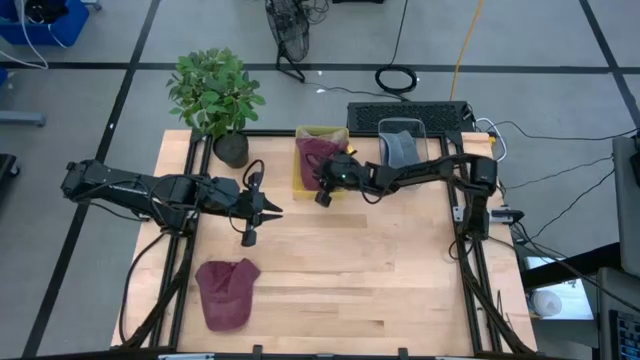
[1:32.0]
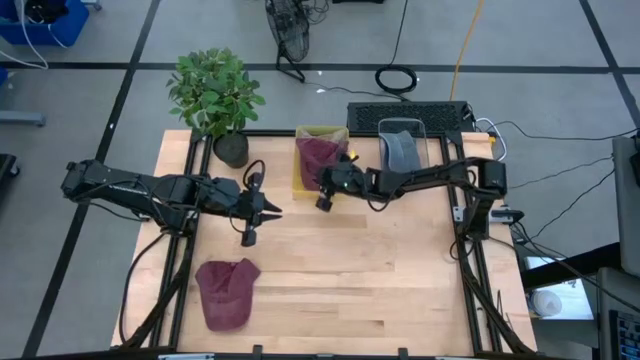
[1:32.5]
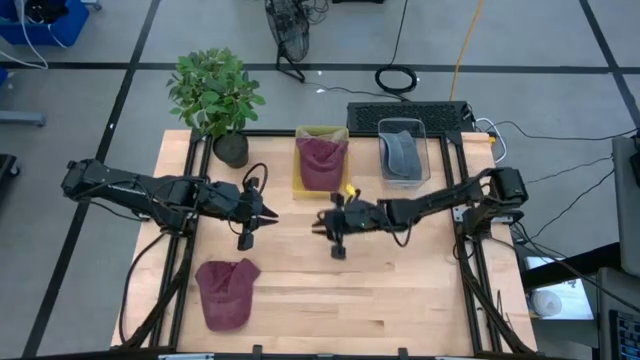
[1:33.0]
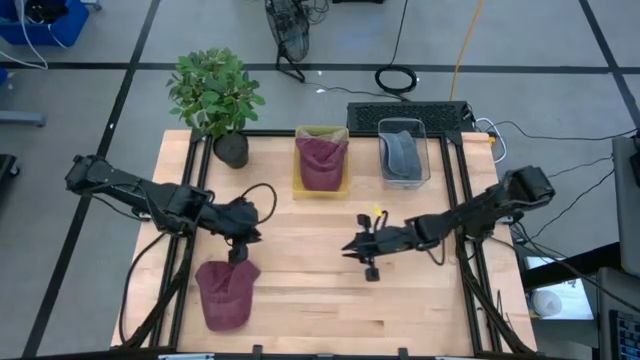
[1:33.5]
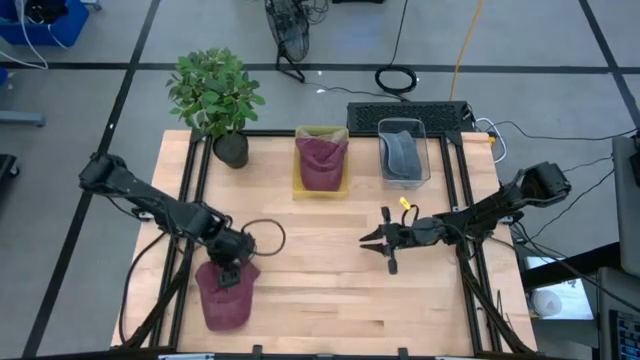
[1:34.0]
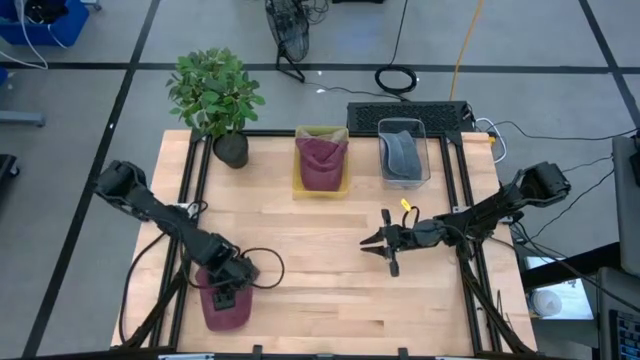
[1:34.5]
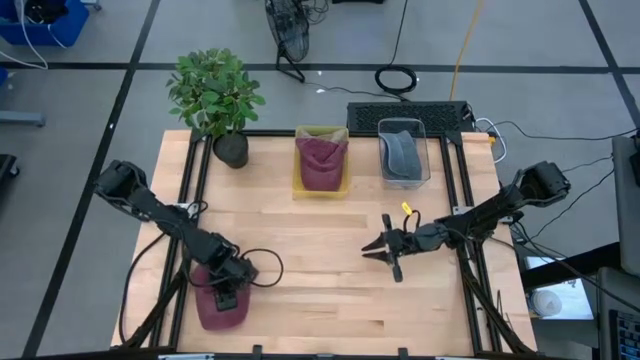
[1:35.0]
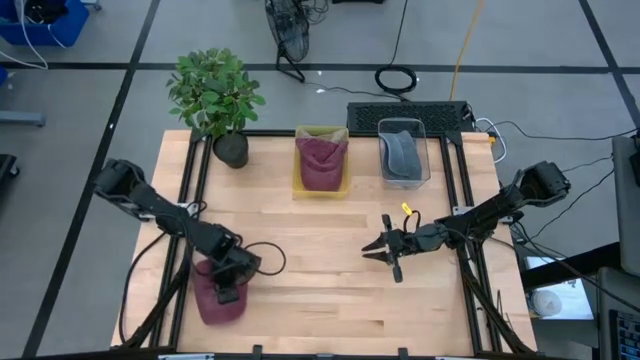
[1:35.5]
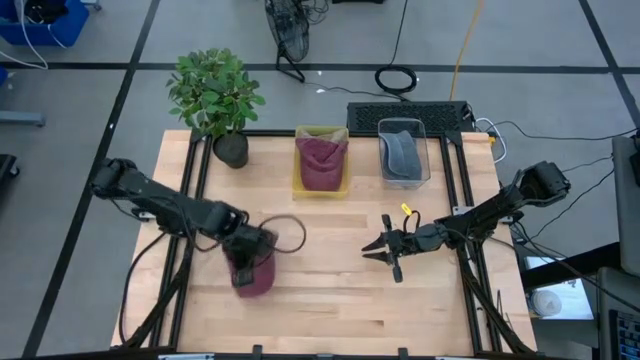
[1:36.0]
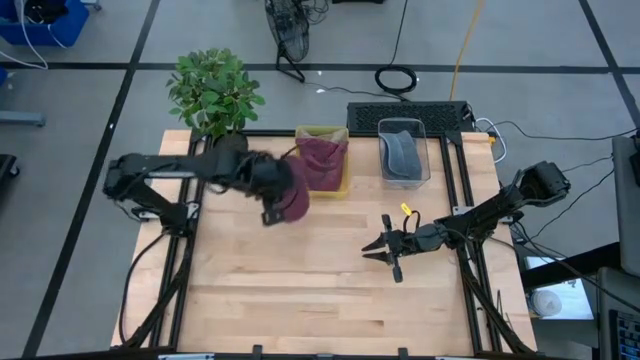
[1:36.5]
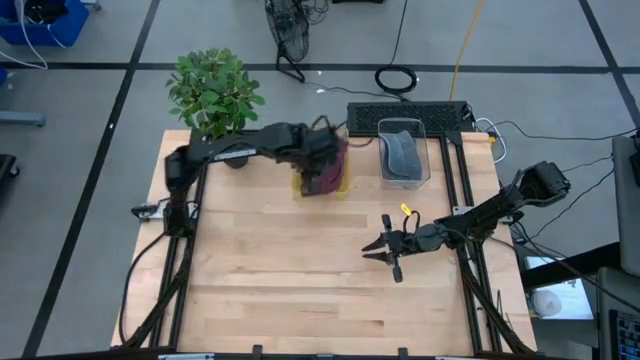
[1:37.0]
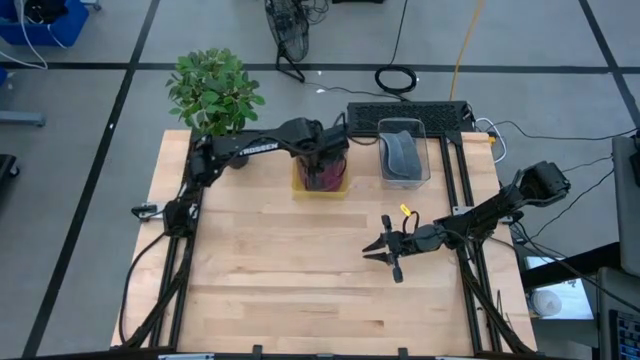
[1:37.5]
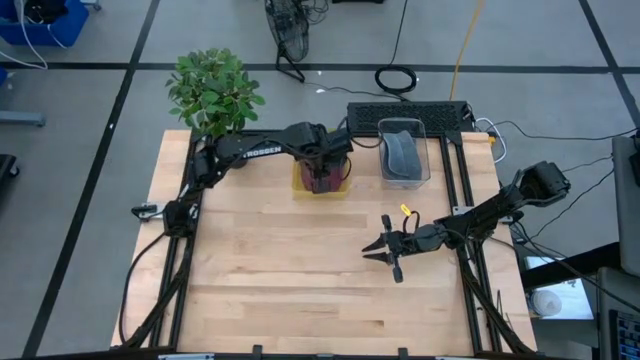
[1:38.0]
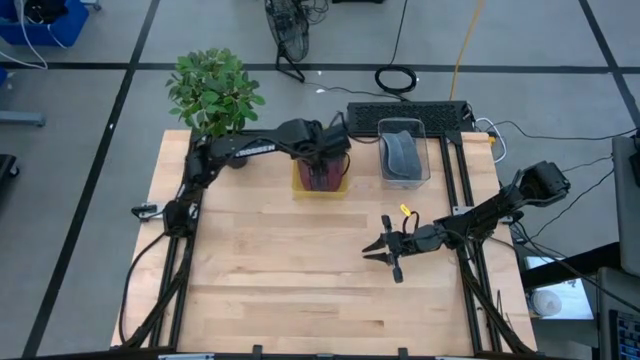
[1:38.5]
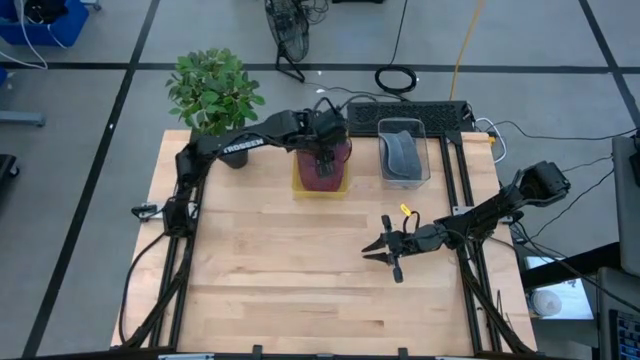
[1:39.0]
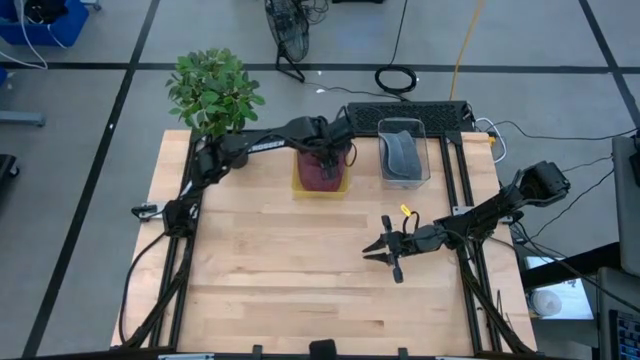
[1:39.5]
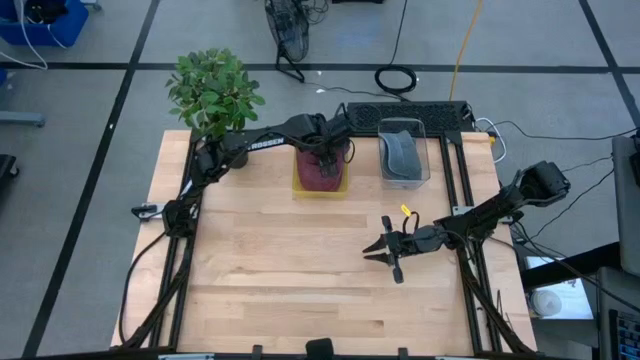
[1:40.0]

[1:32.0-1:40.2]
Task: Pick & Place hat
Put the red cap into the yellow bin

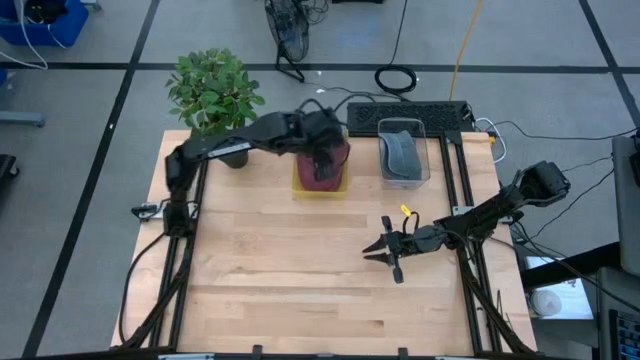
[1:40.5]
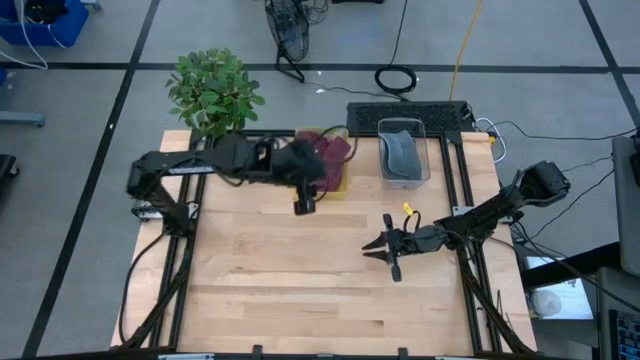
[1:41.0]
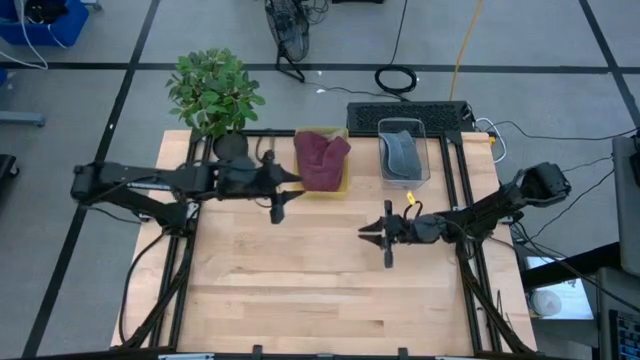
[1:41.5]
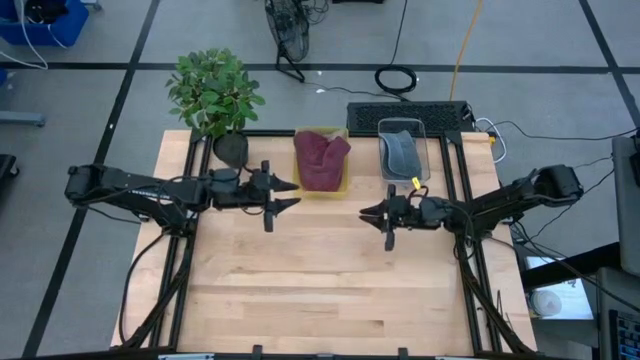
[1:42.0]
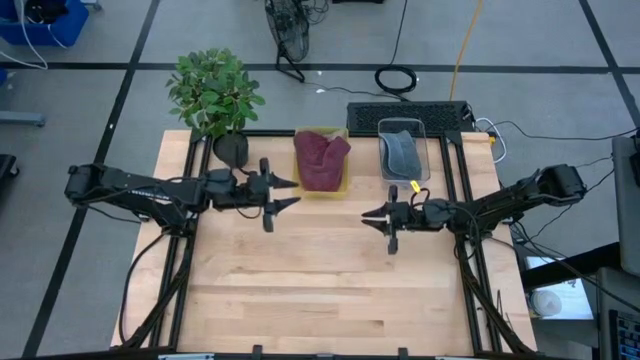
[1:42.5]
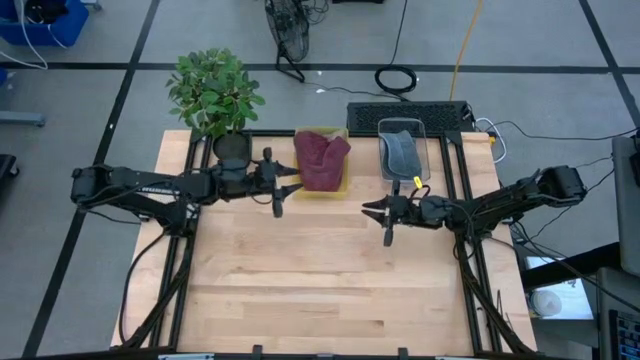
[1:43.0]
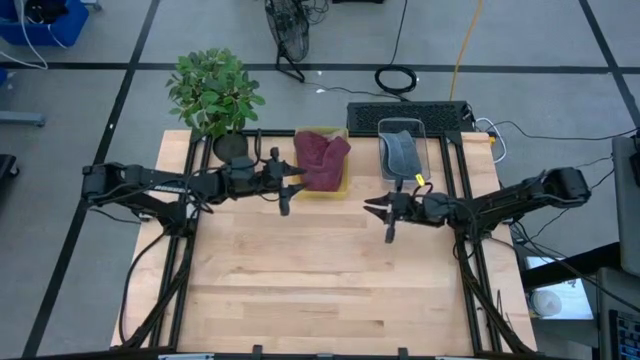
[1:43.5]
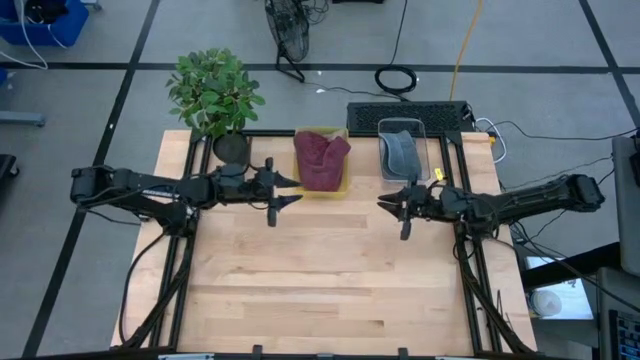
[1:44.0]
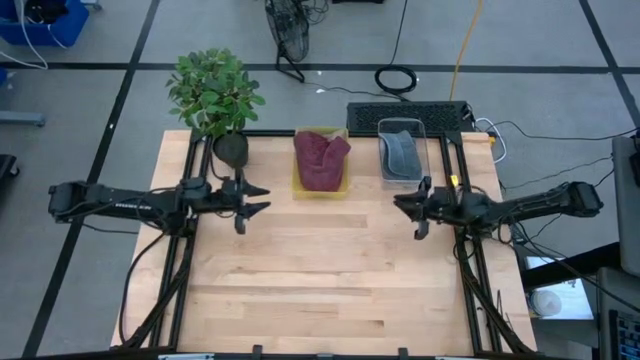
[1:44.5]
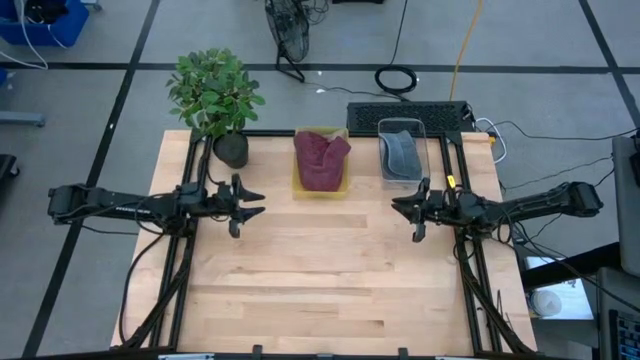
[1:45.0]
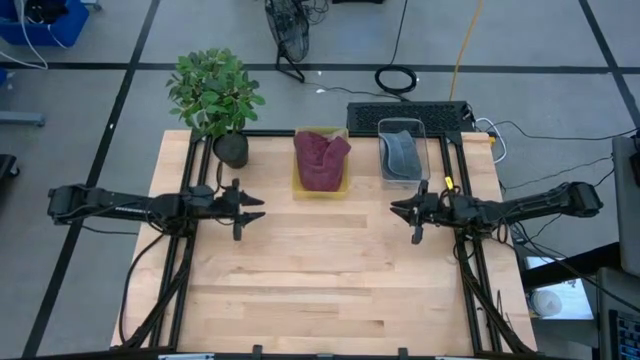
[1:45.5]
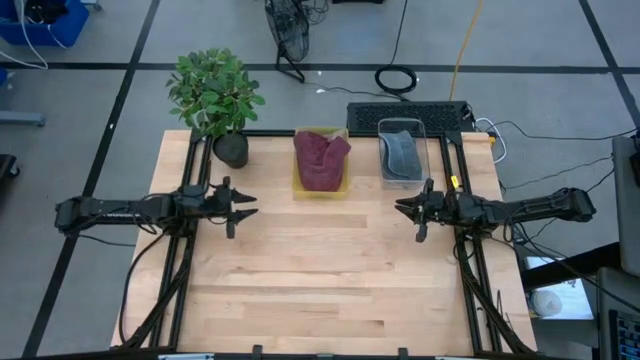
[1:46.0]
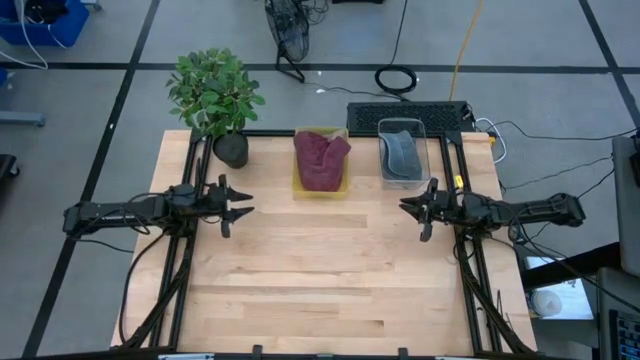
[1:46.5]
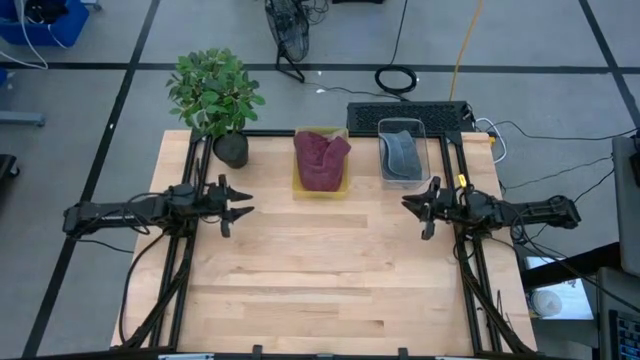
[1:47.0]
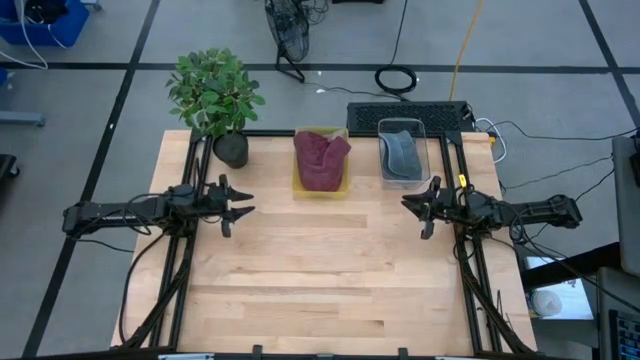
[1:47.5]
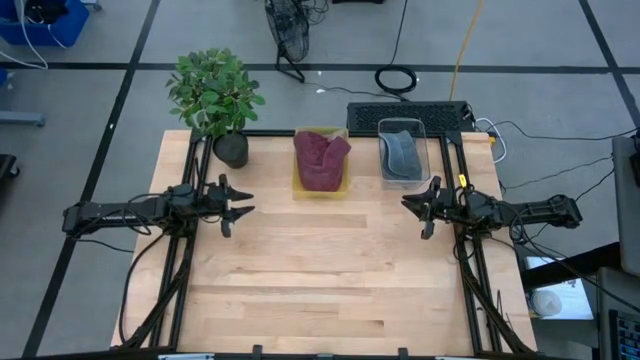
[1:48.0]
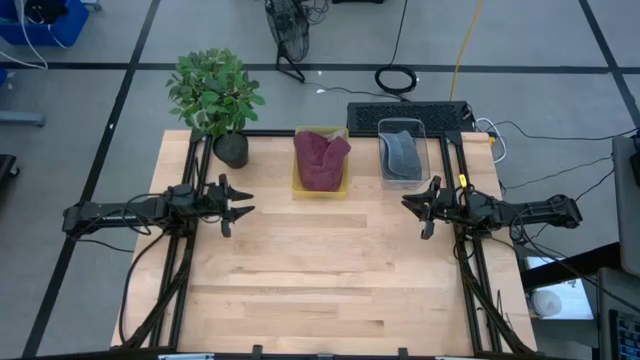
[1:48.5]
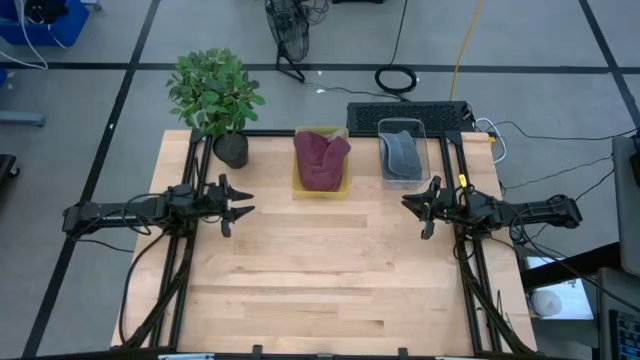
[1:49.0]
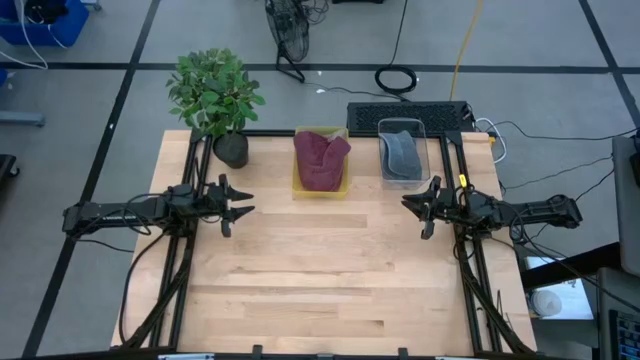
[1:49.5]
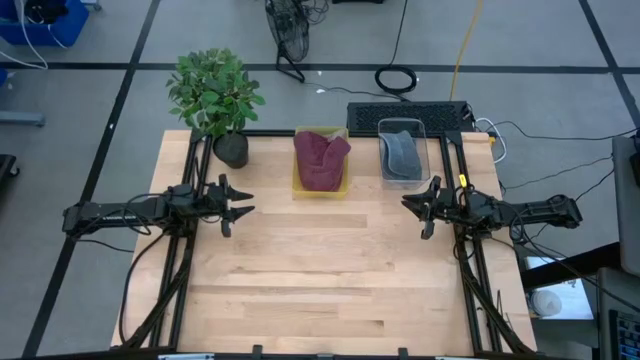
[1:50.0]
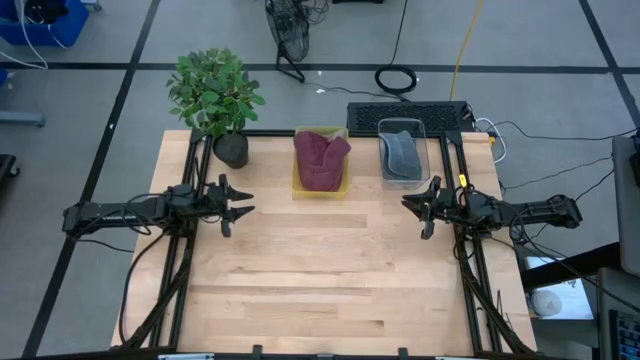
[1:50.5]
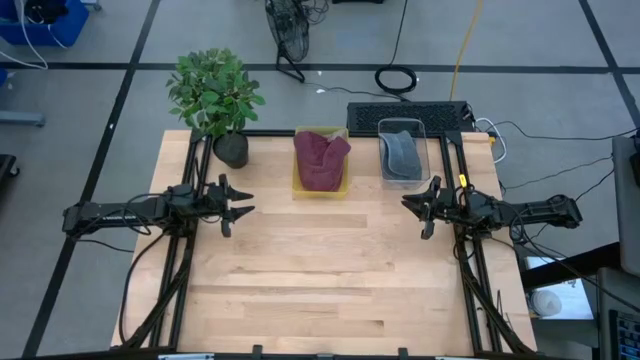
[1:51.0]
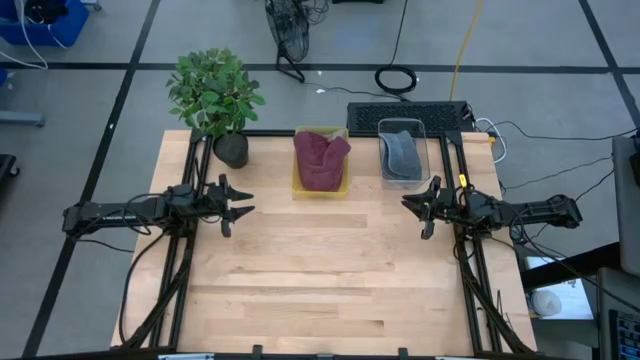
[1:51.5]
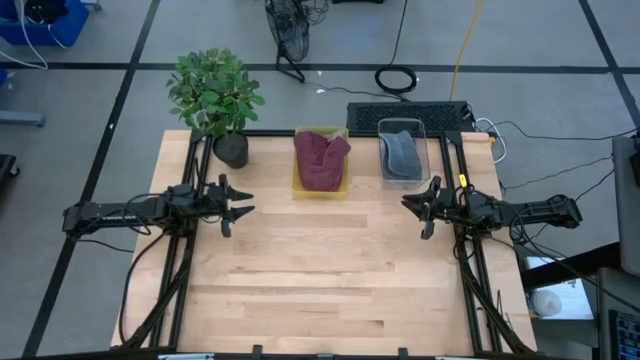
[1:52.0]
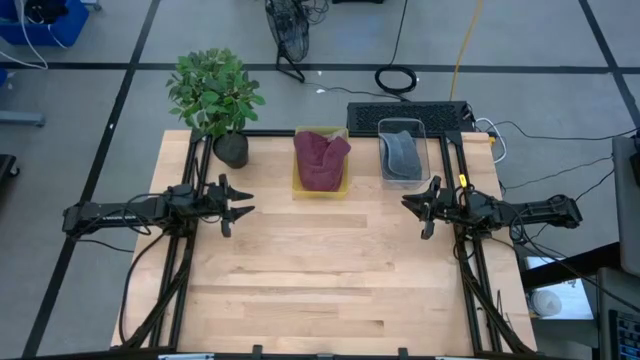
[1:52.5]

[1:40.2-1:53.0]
Return to Home Position
